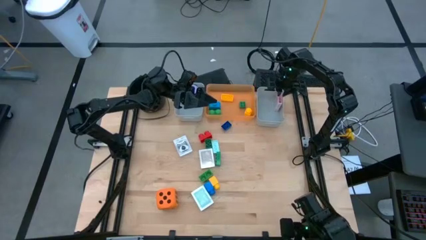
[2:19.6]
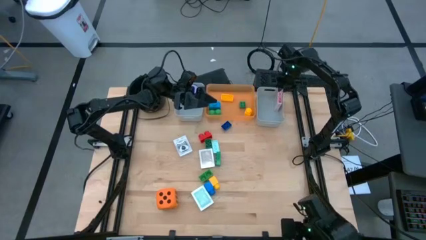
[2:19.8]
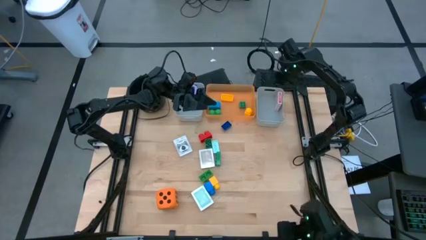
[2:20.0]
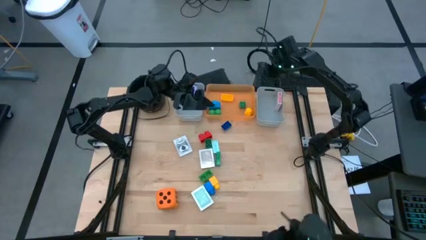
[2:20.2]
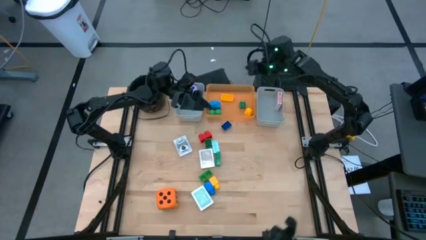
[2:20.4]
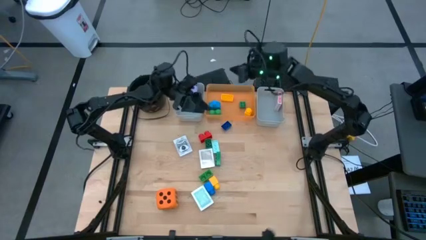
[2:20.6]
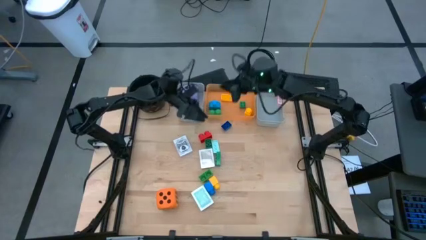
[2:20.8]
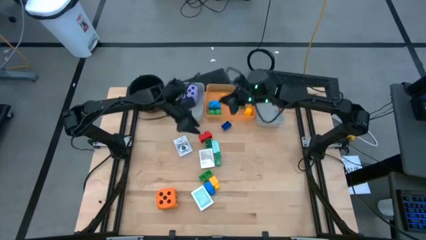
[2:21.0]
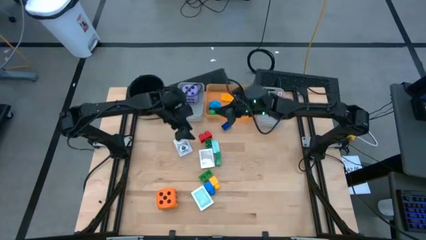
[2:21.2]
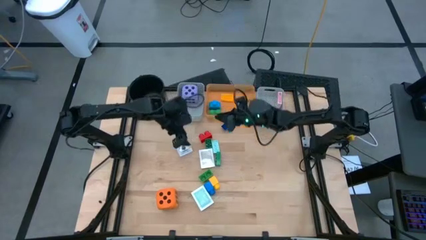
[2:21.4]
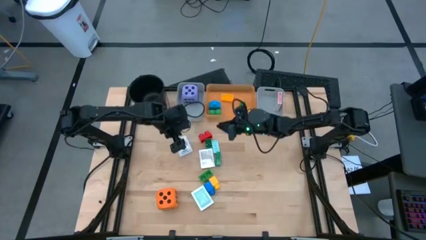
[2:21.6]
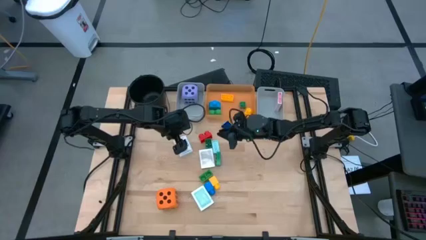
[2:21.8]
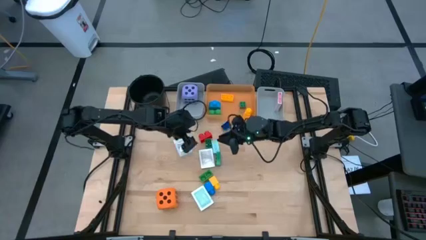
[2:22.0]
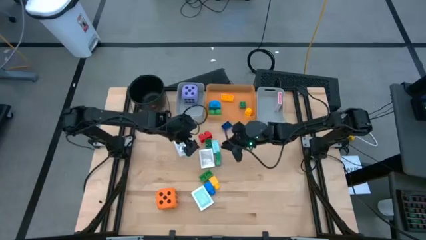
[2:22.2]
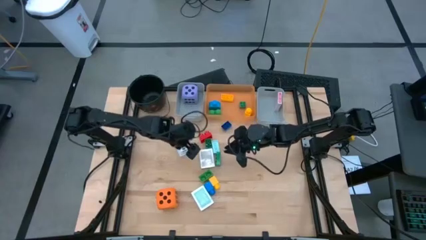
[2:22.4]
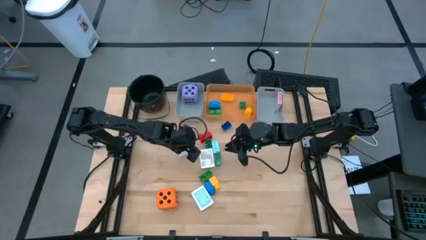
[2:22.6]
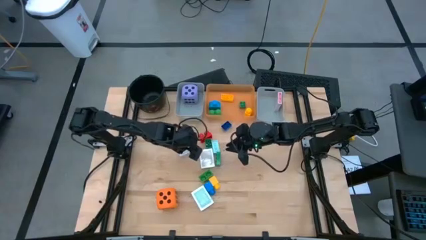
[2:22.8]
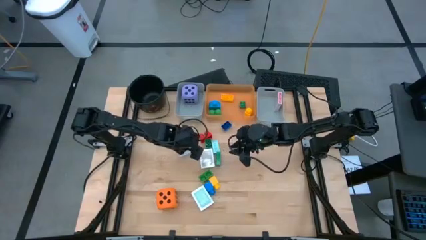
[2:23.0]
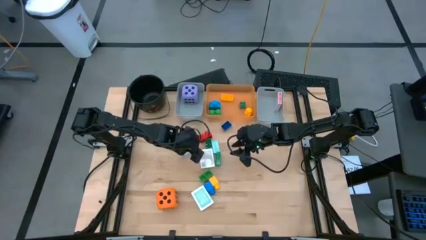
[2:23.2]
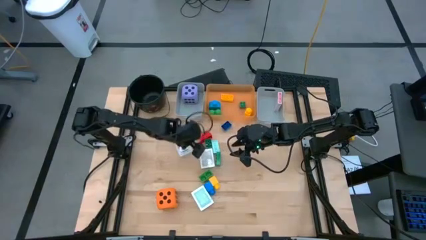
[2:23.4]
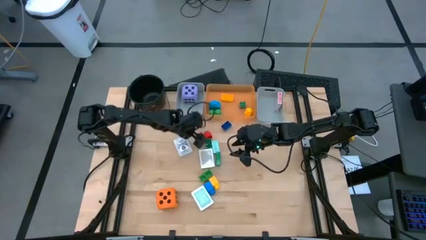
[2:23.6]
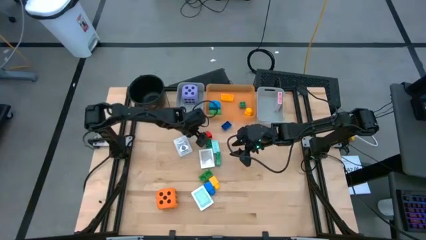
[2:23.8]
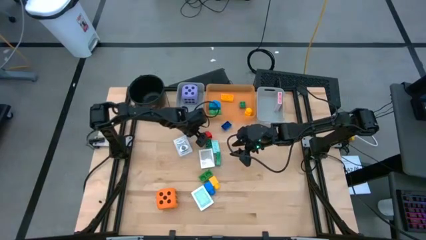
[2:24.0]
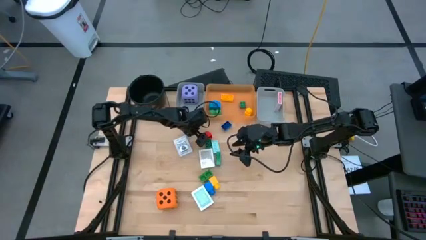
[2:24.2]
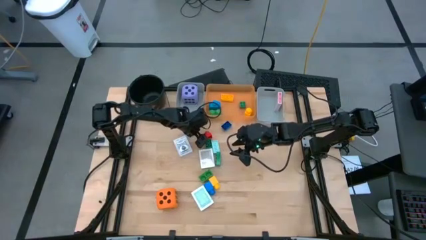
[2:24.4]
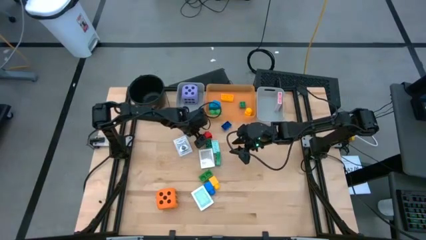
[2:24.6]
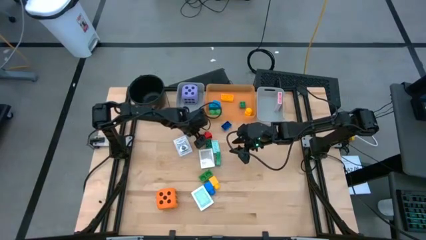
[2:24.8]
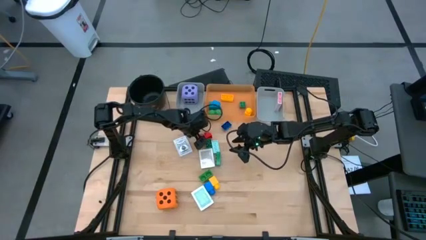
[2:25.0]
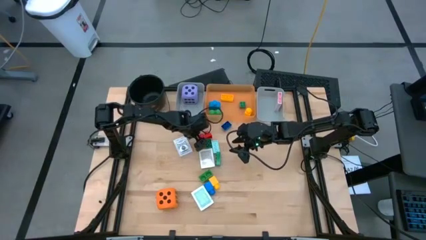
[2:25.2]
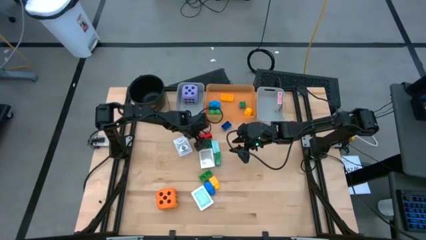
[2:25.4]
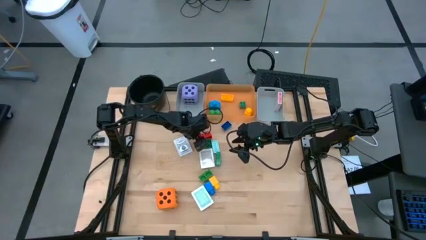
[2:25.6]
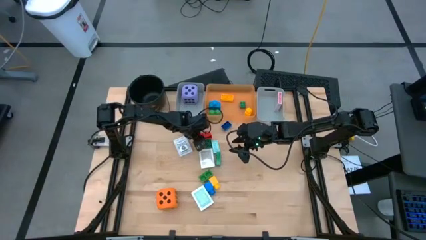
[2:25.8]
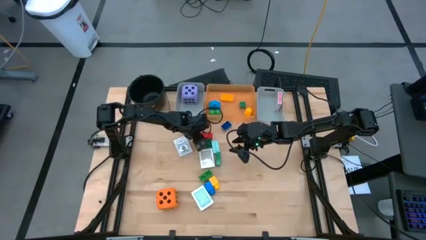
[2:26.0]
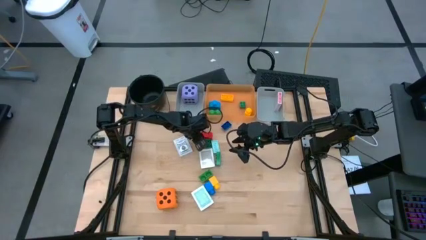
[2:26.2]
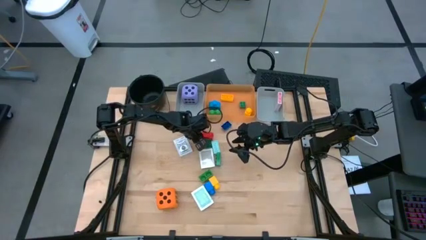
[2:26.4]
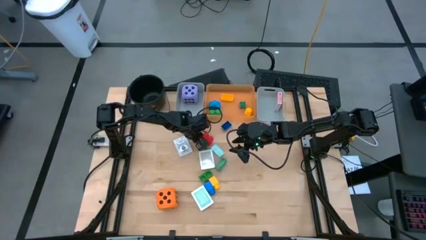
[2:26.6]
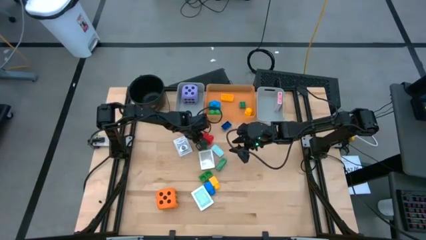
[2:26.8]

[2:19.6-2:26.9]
Task: Pick & Place Toys
Put the red game piece into the orange bin

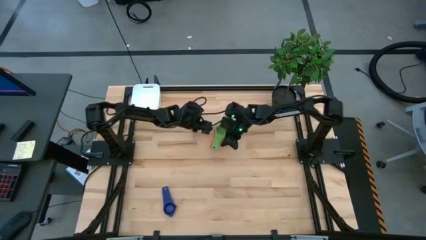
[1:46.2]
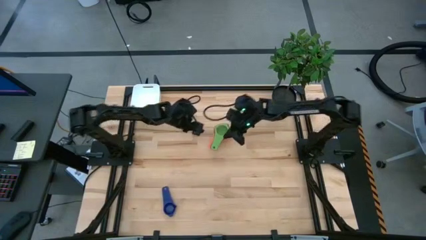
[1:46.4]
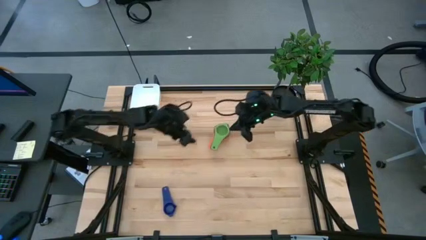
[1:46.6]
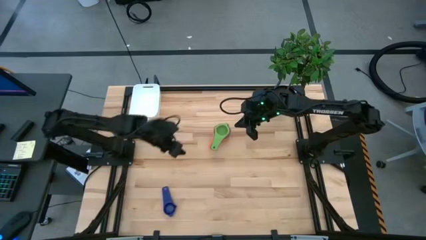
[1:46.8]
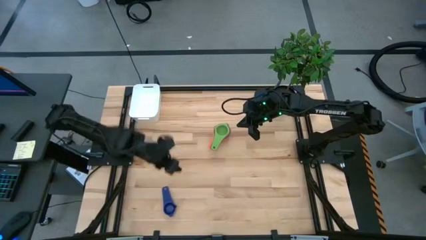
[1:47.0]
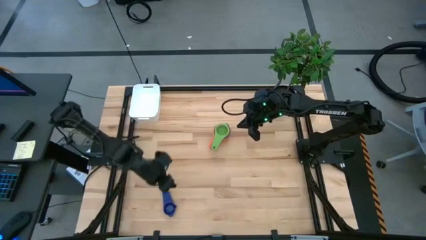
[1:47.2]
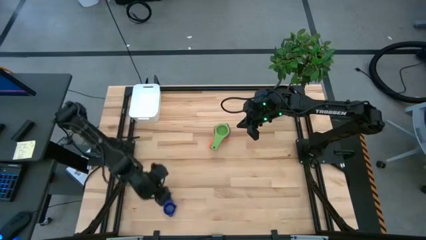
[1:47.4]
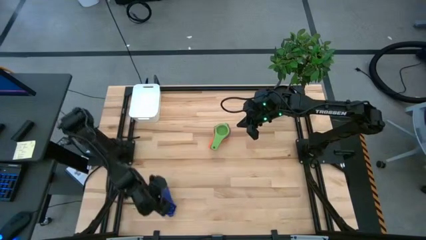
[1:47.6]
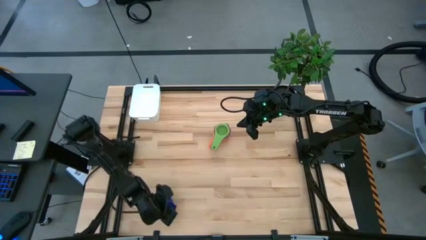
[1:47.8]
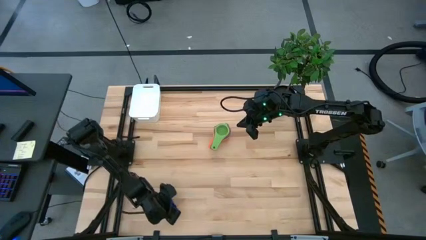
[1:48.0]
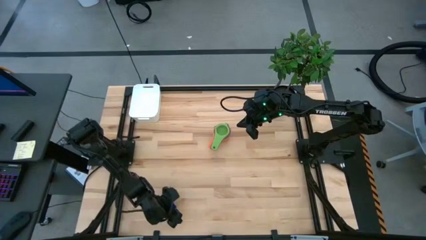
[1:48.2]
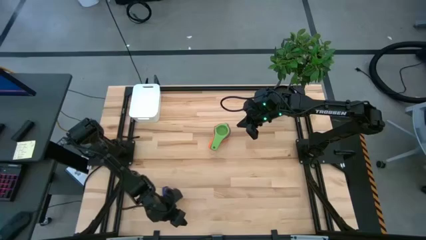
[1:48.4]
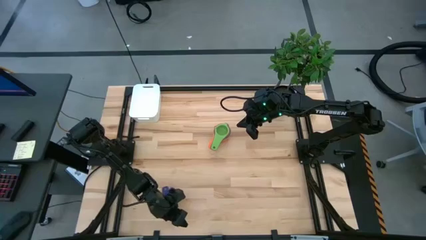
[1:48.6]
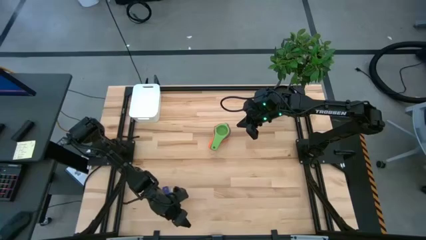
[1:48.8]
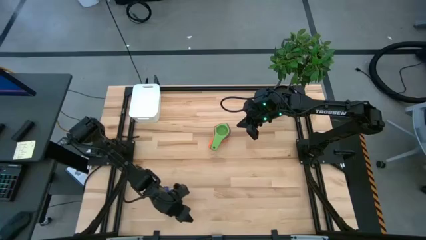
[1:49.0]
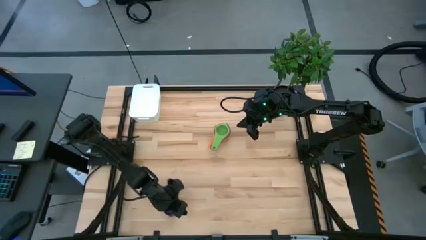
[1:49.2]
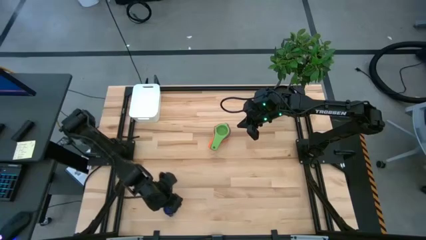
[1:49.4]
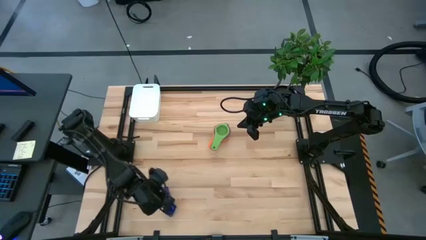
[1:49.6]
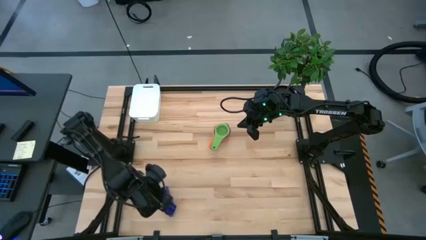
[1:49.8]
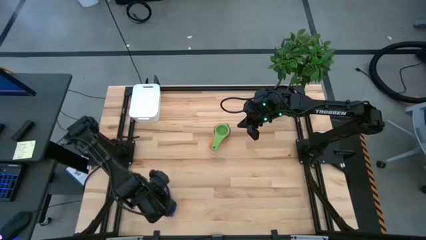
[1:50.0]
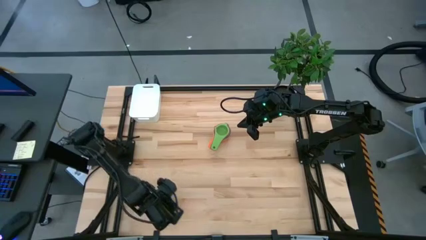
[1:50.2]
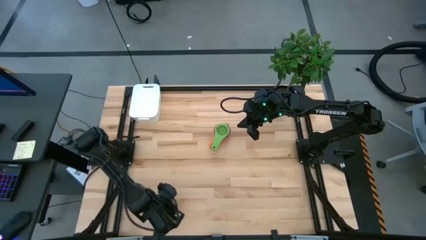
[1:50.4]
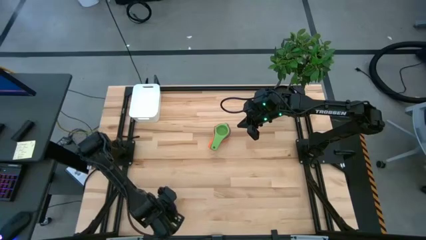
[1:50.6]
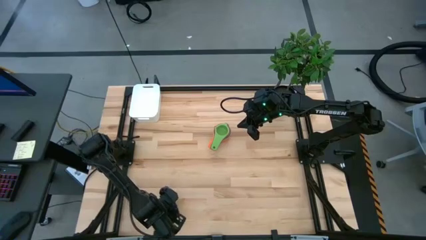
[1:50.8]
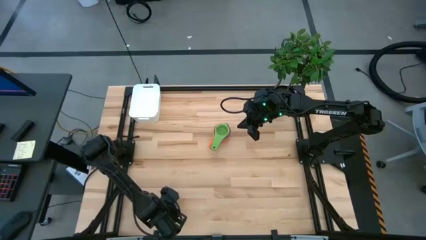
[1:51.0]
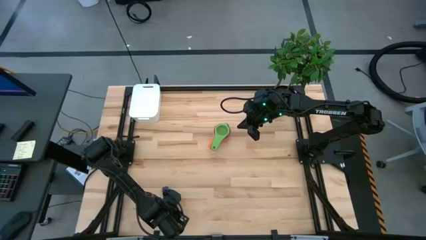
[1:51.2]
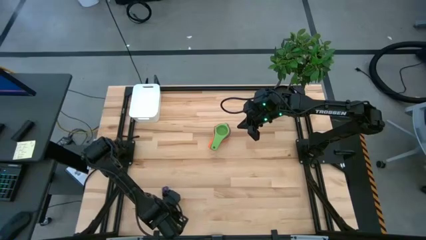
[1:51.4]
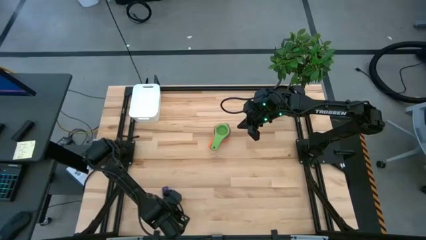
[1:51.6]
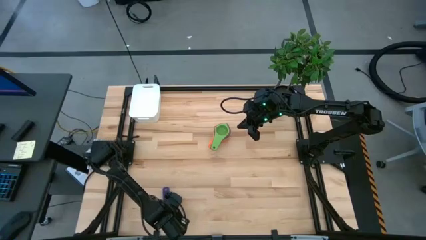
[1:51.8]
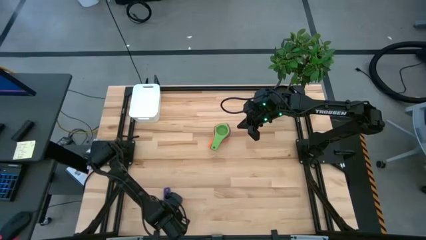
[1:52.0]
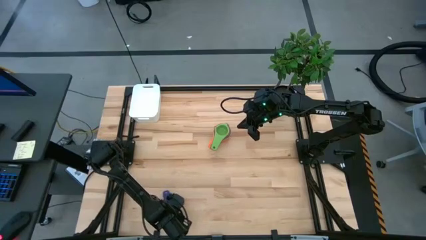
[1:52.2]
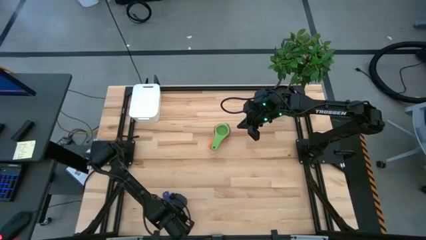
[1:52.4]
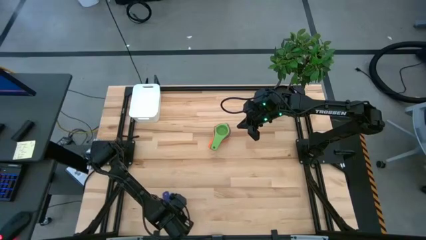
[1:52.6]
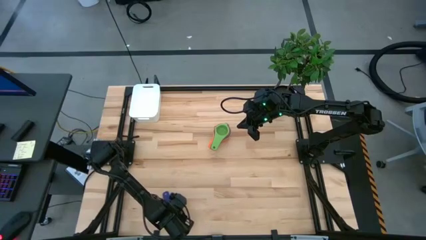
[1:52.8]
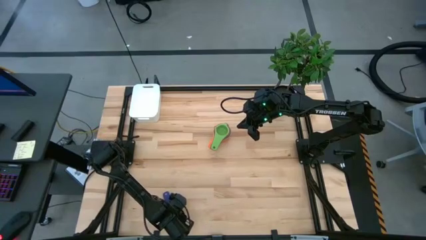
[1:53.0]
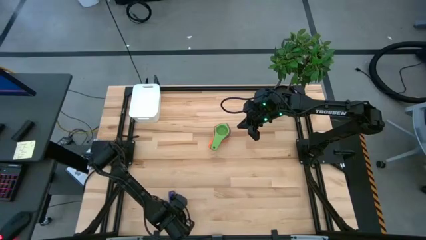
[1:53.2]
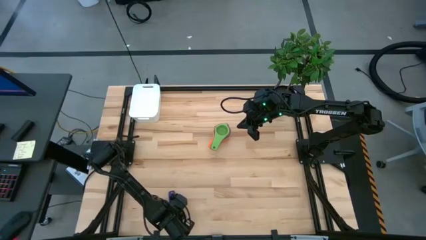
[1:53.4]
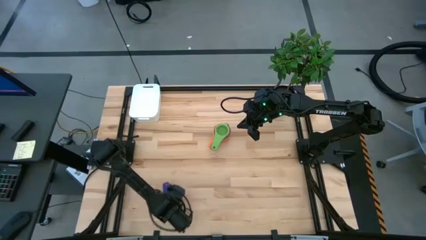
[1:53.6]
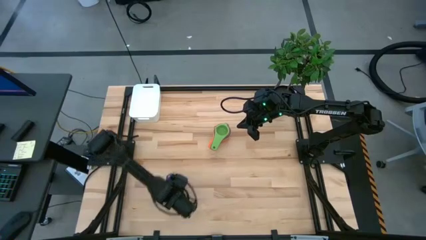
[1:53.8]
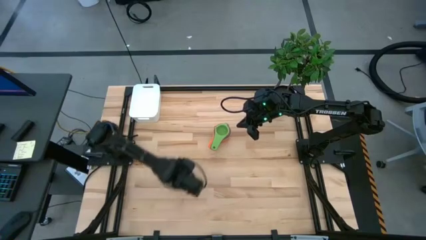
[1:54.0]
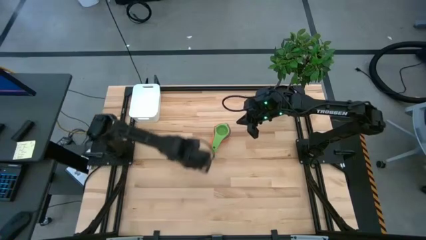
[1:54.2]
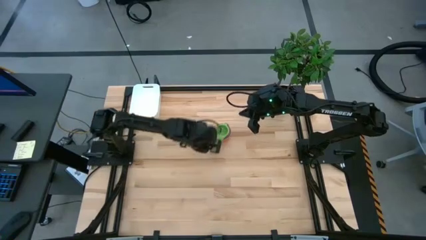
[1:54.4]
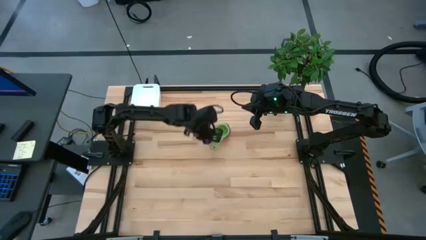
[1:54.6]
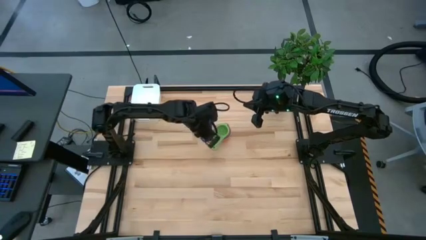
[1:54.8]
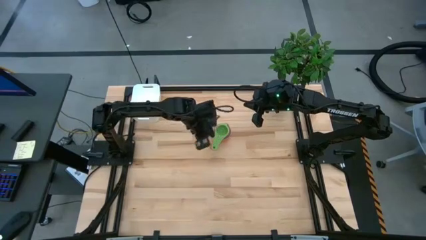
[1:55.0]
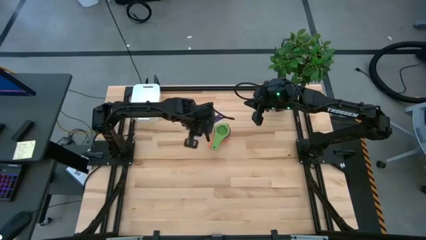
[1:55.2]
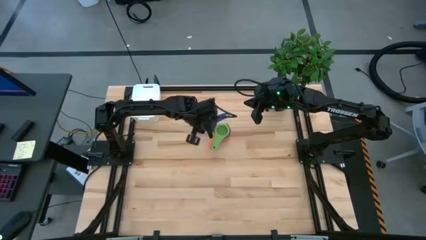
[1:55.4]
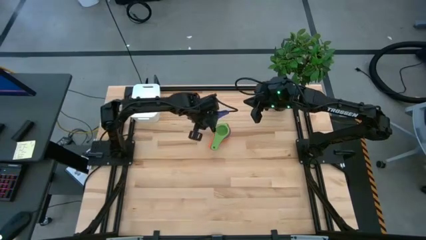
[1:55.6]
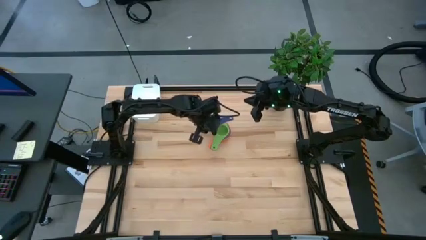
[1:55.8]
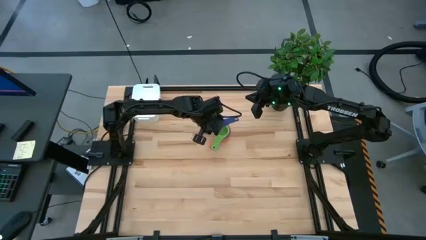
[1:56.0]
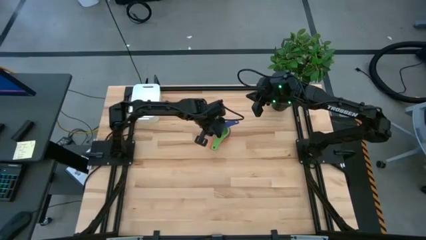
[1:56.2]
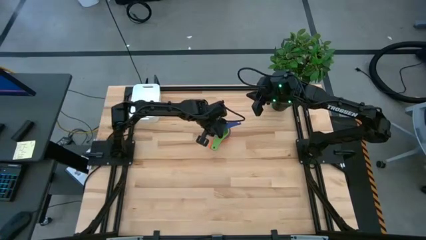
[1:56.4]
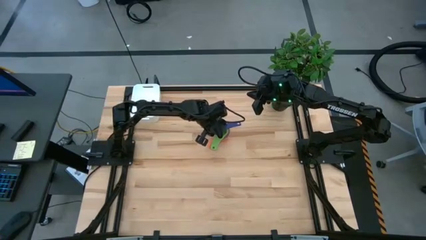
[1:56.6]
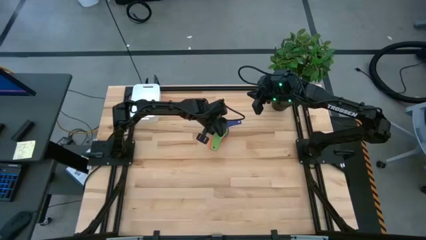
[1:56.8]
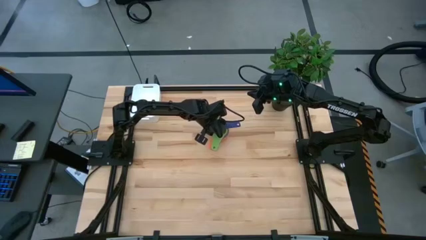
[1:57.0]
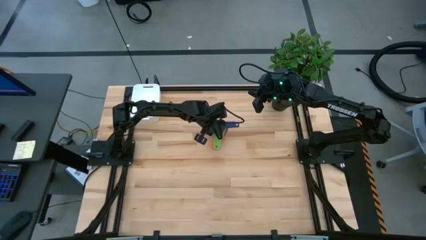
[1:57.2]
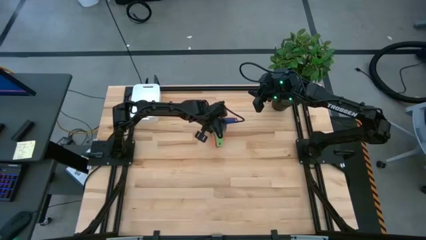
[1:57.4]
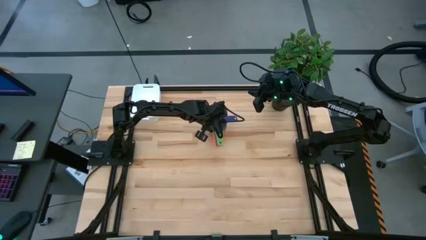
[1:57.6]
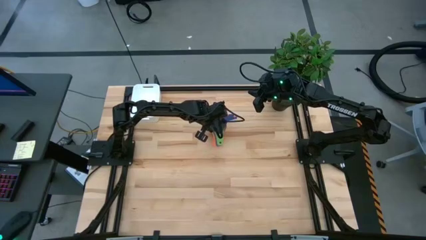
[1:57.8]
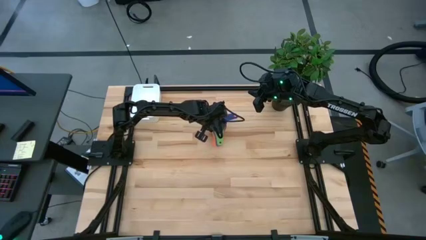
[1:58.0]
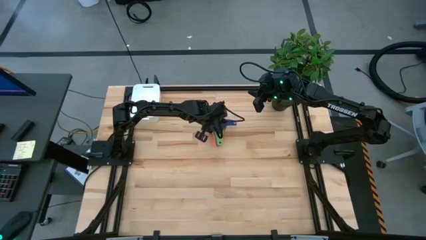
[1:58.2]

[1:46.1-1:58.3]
Task: Nest measuring cups in basket
Stack the dark blue measuring cup on top of the green measuring cup
